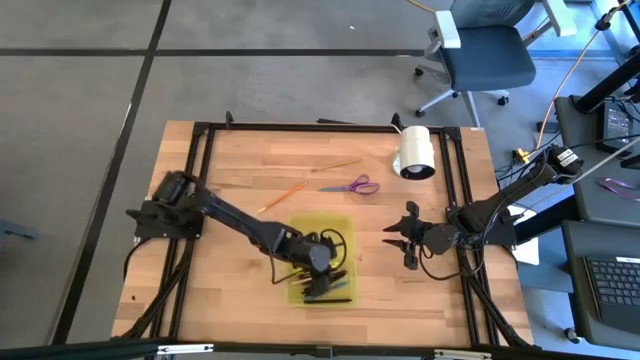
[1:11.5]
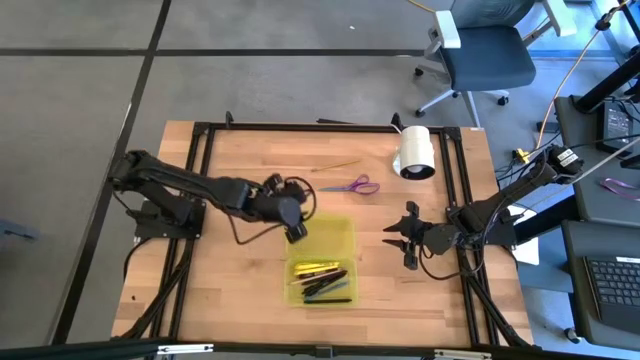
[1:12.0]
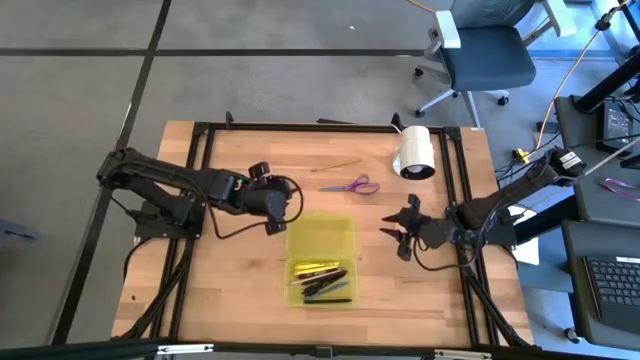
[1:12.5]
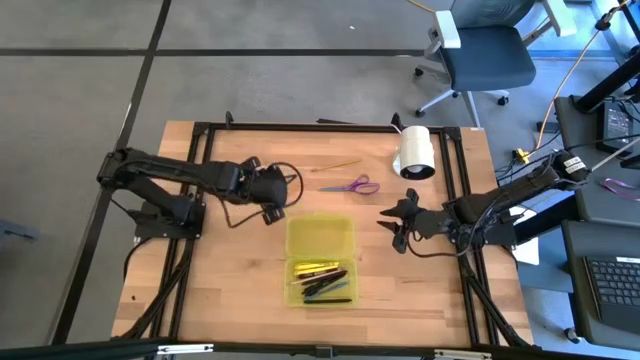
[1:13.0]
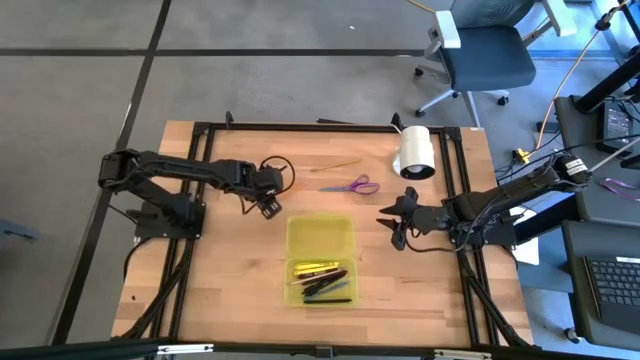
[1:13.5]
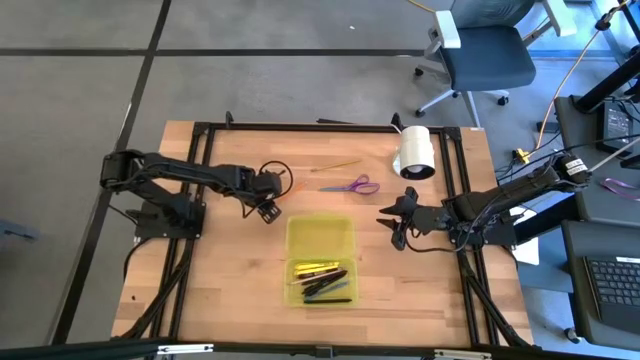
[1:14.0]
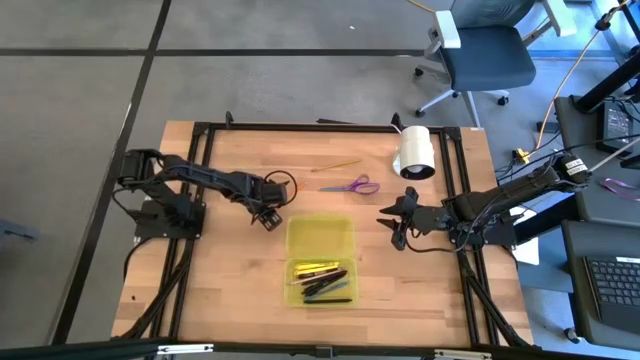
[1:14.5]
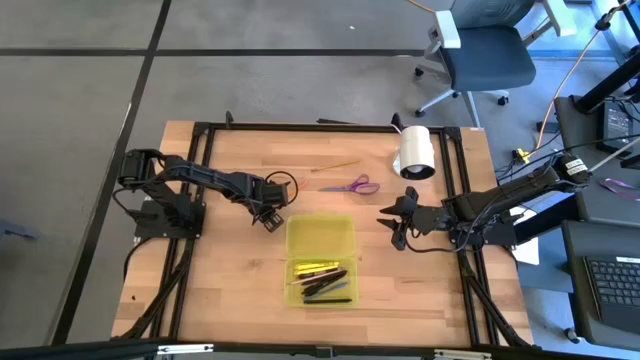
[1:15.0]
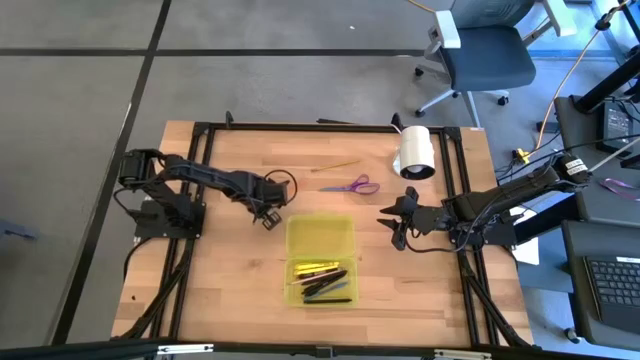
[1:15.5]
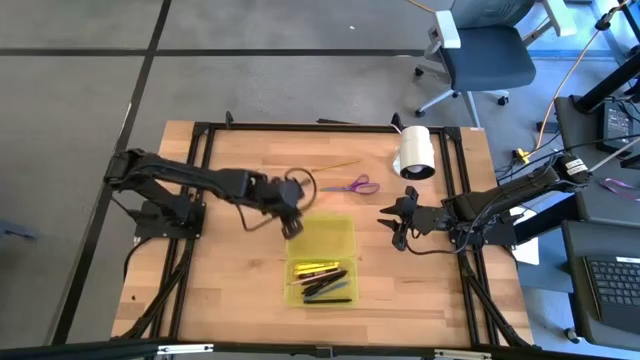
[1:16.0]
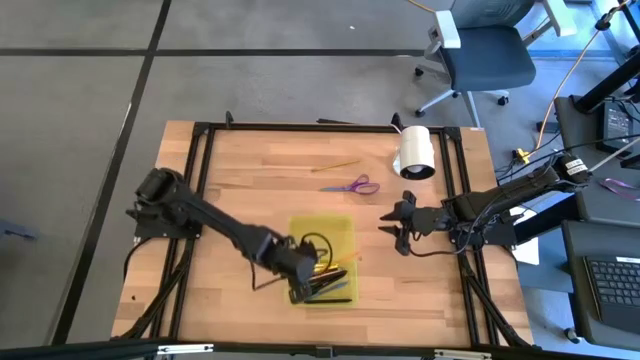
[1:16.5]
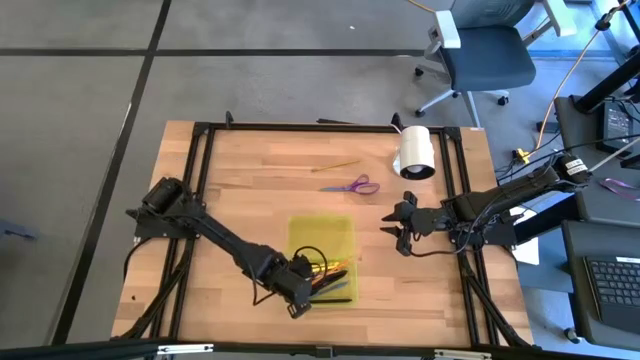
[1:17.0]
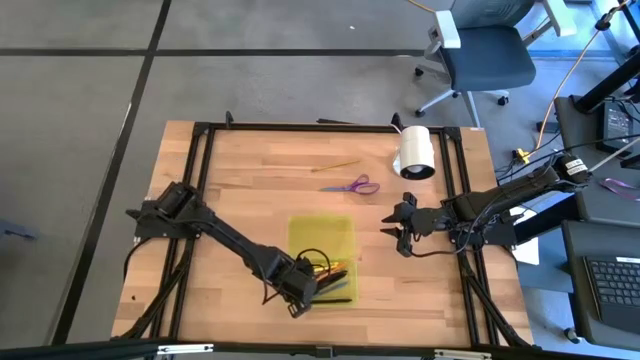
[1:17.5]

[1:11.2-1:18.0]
Task: Pick & place school supplies into a supply box
Put the orange pencil into the yellow supply box

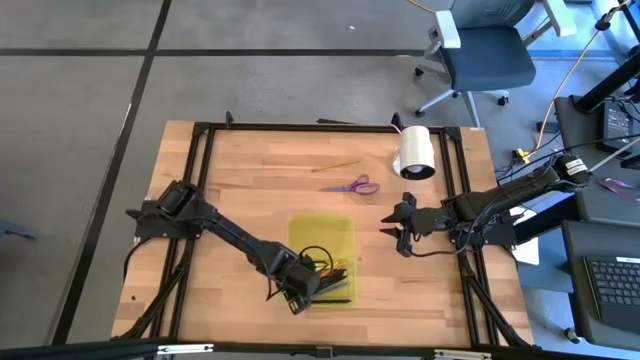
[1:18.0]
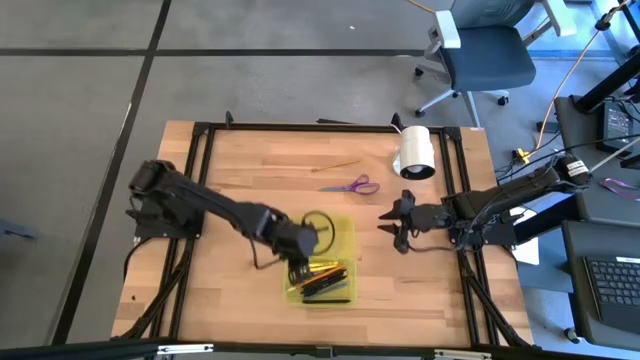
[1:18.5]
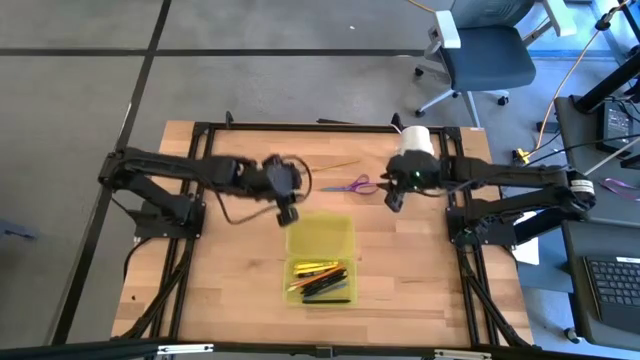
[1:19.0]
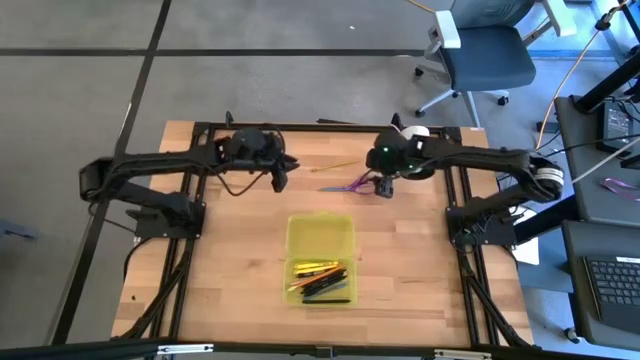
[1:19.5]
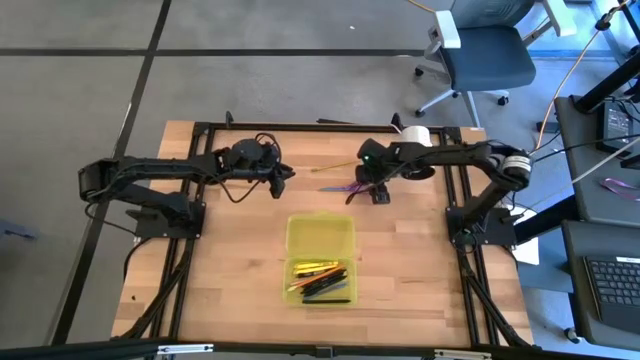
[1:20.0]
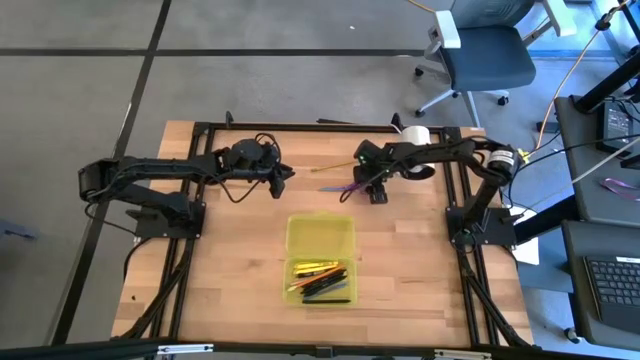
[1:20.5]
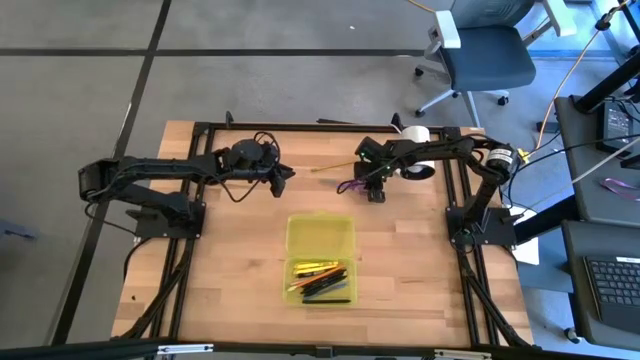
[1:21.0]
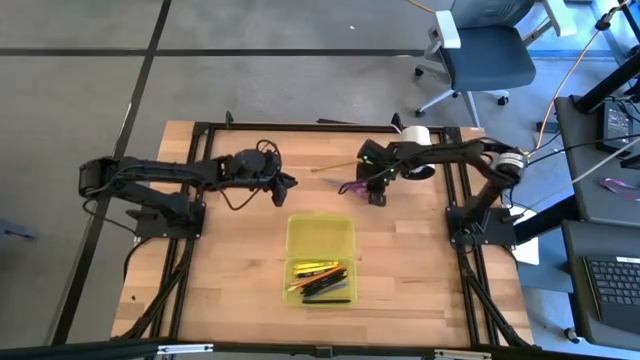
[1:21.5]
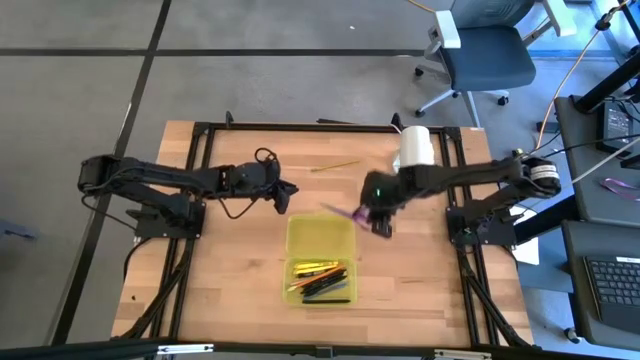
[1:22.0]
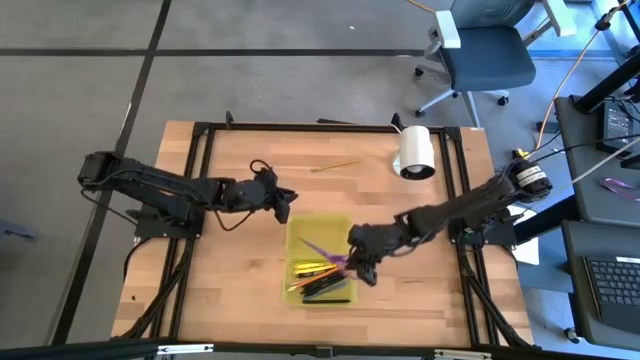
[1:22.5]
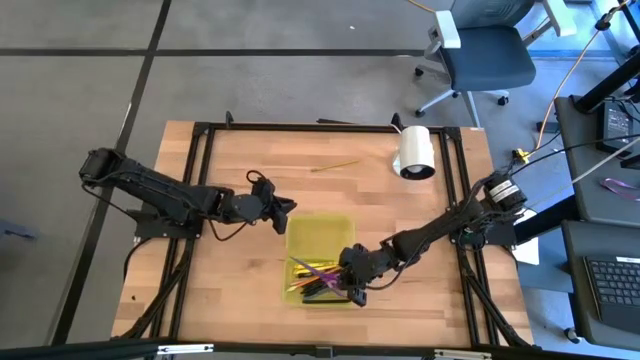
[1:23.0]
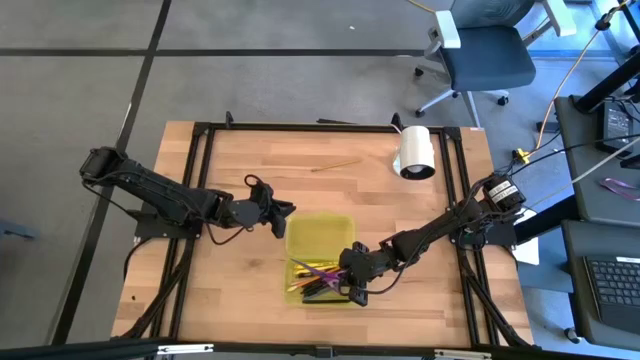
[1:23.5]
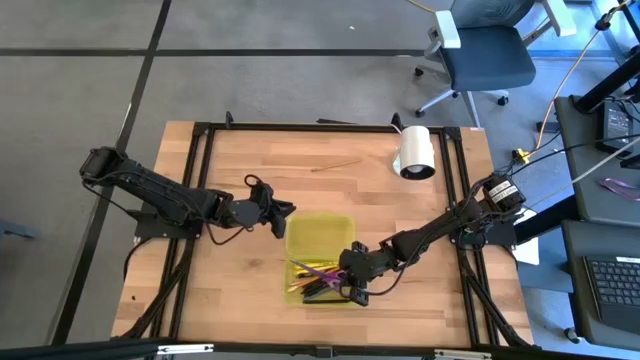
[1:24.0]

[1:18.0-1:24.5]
Put the purple scissors into the yellow supply box

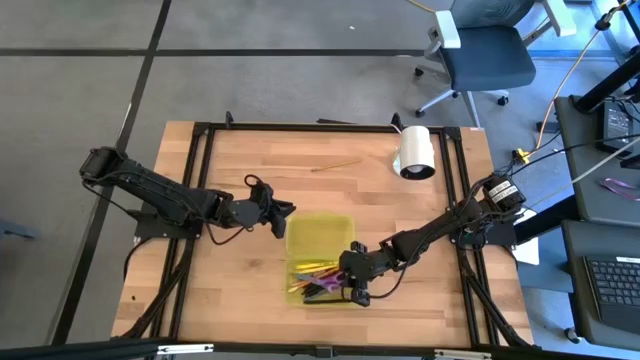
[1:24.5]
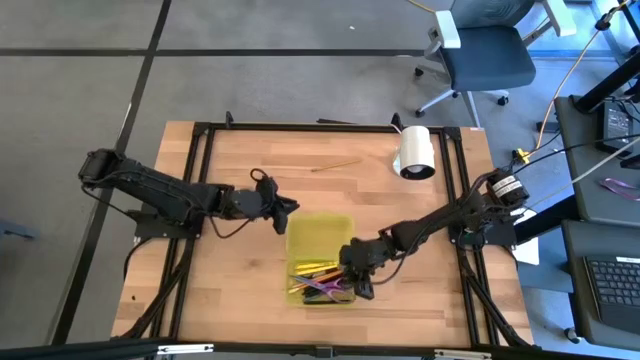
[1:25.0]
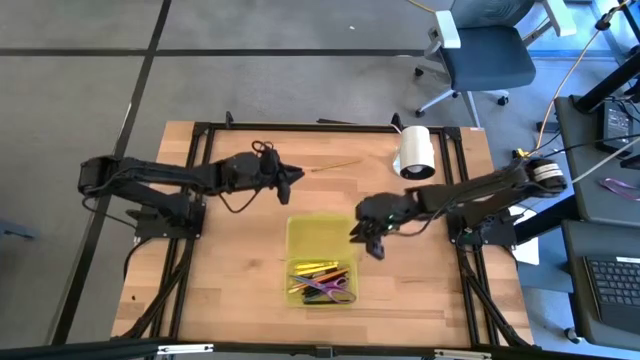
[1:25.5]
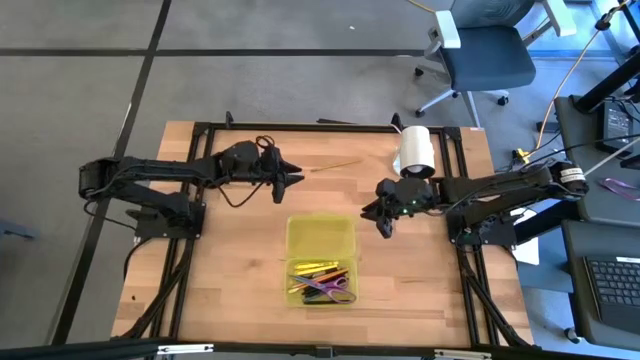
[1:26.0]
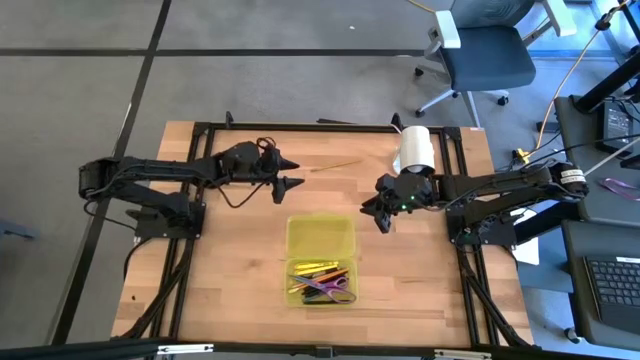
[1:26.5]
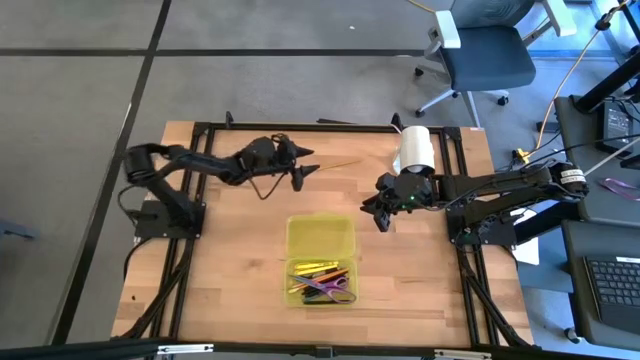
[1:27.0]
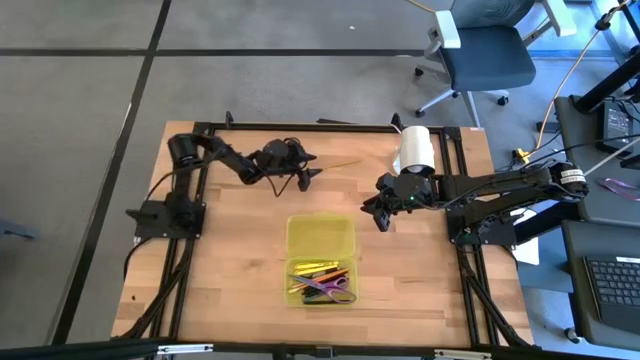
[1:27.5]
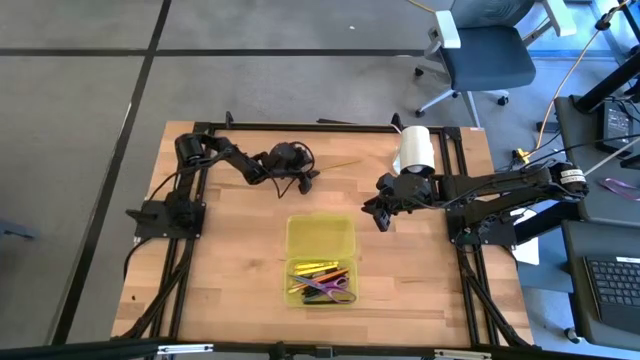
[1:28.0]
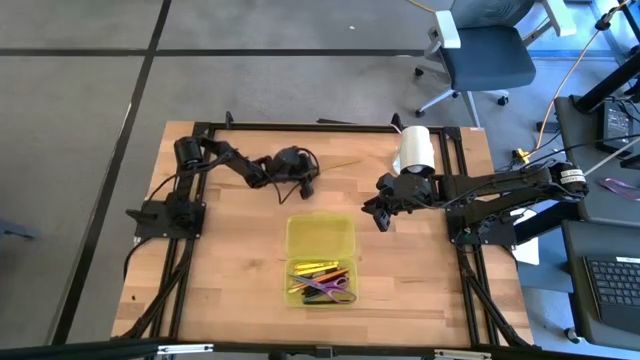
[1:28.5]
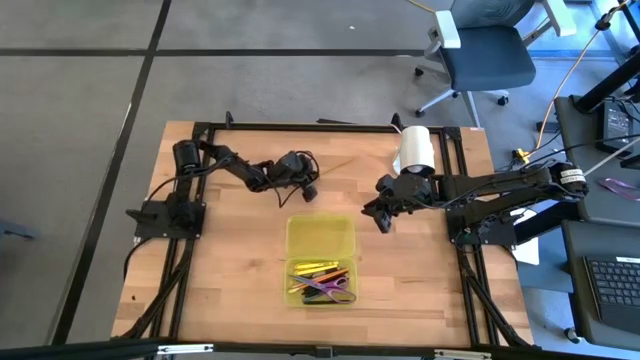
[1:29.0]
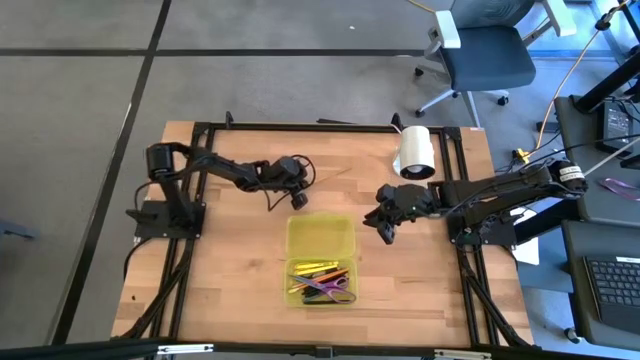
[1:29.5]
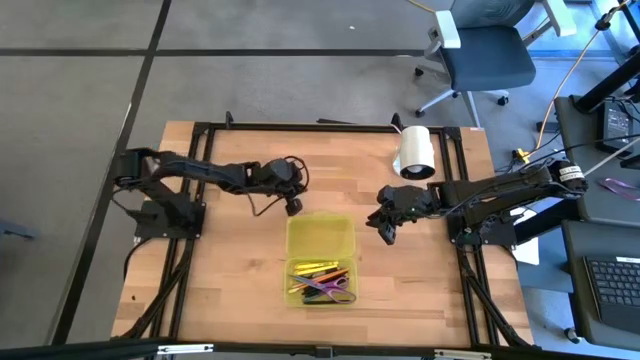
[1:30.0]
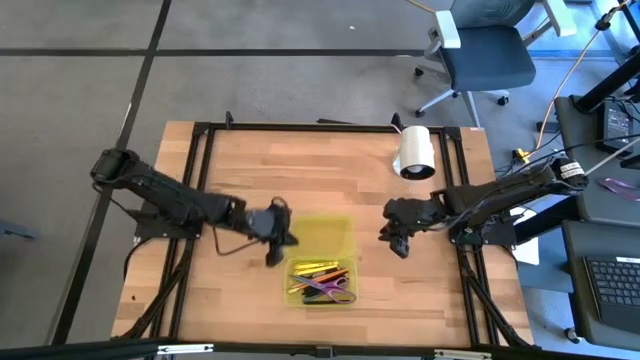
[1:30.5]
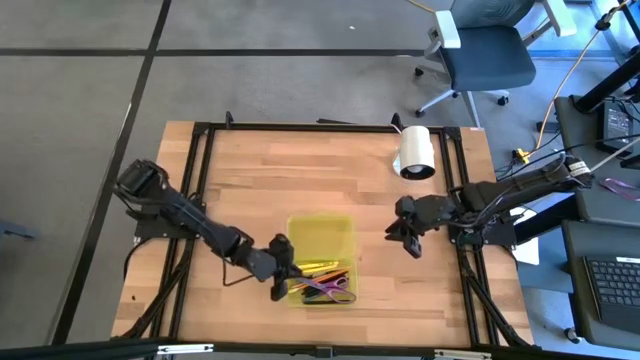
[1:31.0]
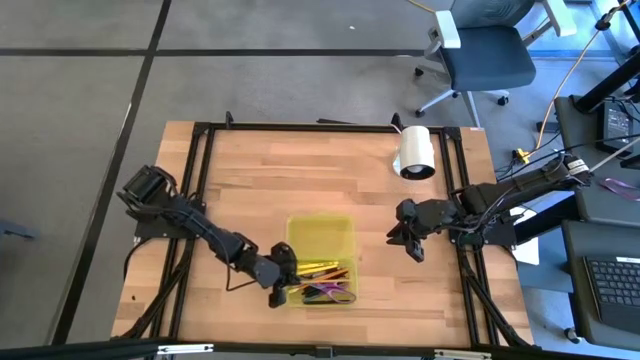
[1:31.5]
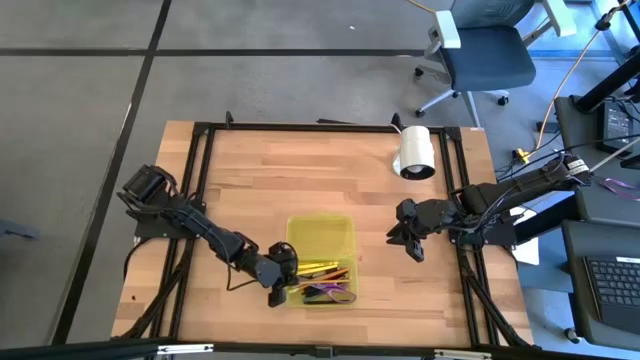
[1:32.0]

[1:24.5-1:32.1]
Put the yellow pencil into the yellow supply box

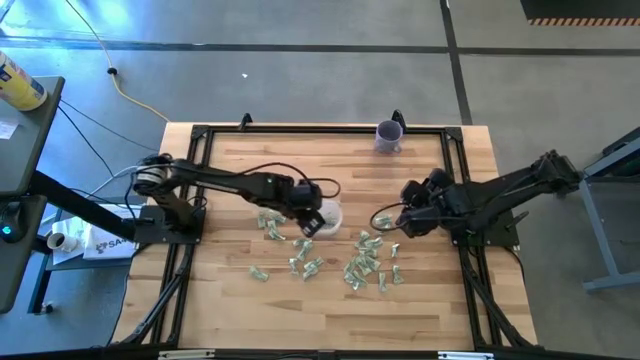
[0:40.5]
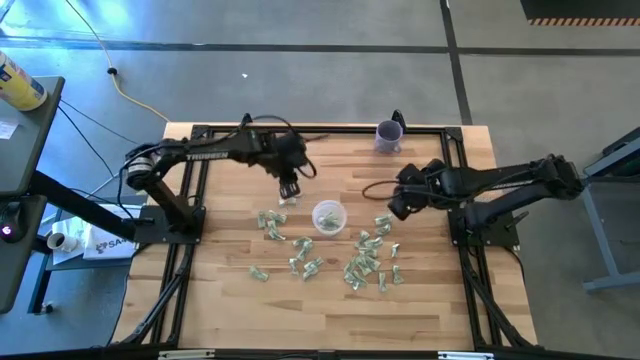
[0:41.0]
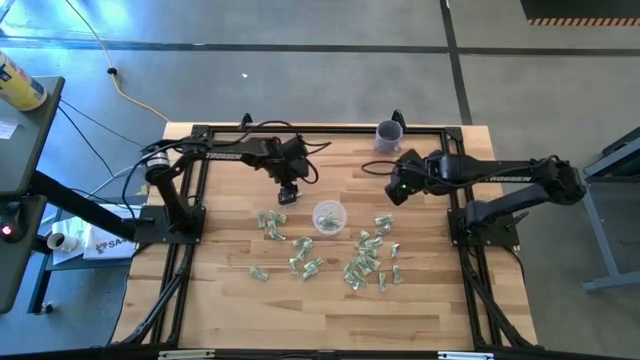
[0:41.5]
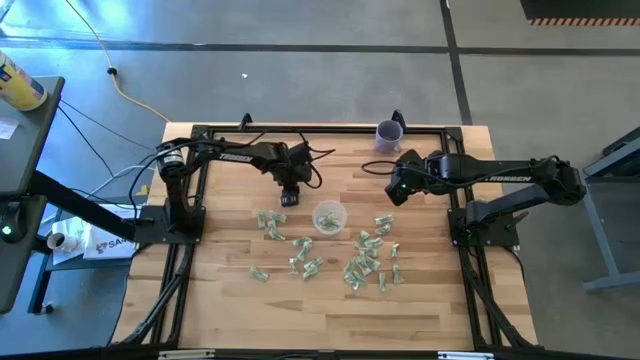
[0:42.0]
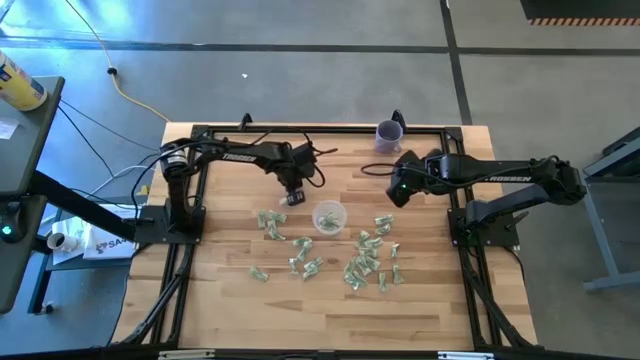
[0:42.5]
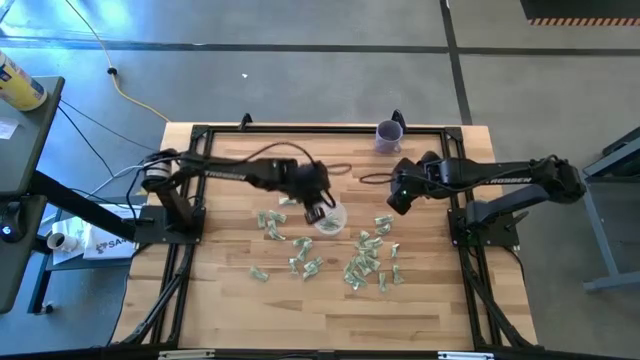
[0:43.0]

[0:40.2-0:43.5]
Task: Pick and place Stevia / Truvia into bins
Put the green stevia packet into the transparent bin
